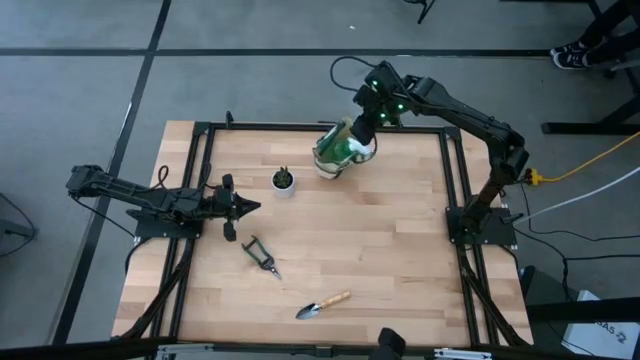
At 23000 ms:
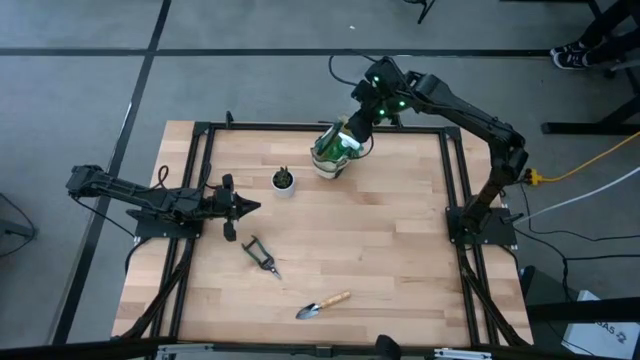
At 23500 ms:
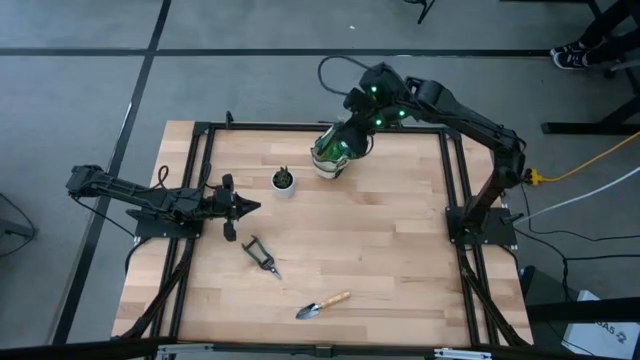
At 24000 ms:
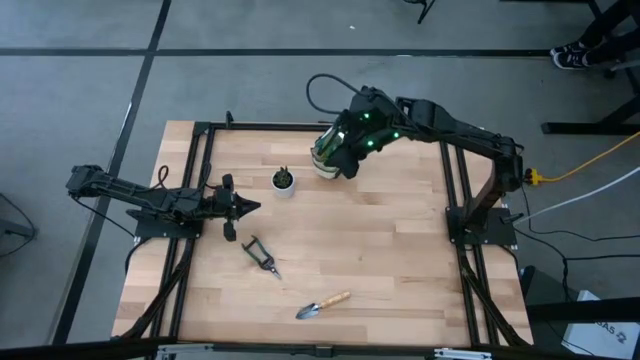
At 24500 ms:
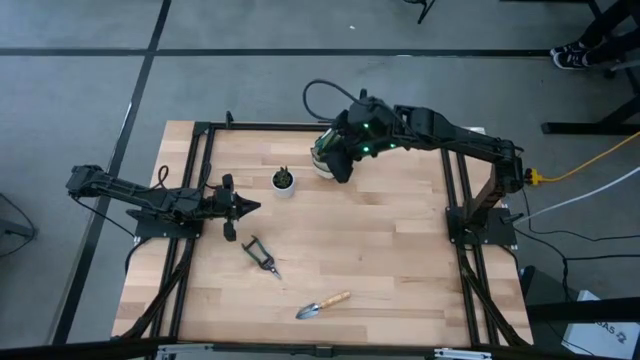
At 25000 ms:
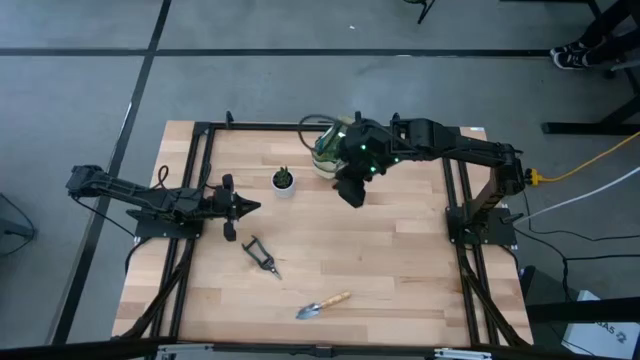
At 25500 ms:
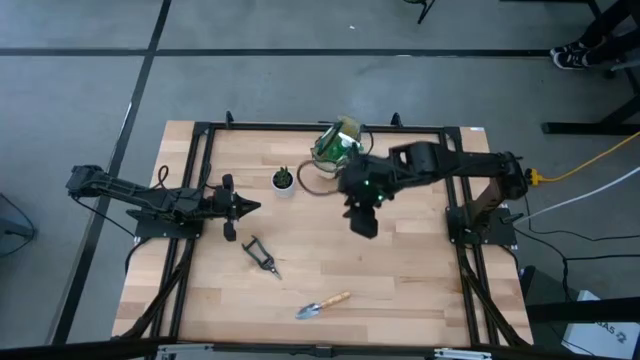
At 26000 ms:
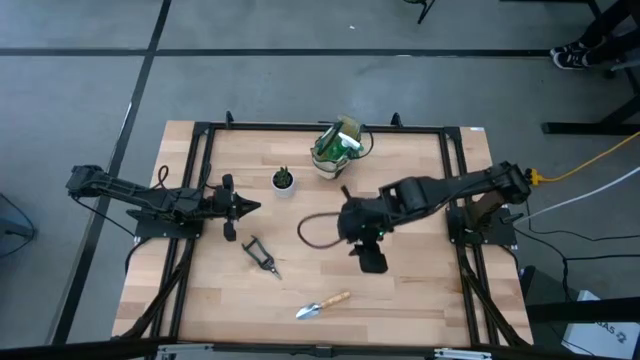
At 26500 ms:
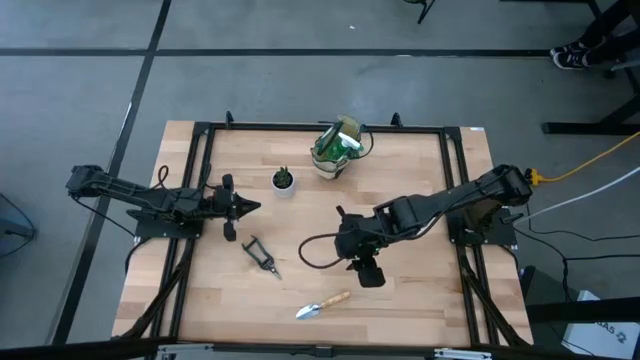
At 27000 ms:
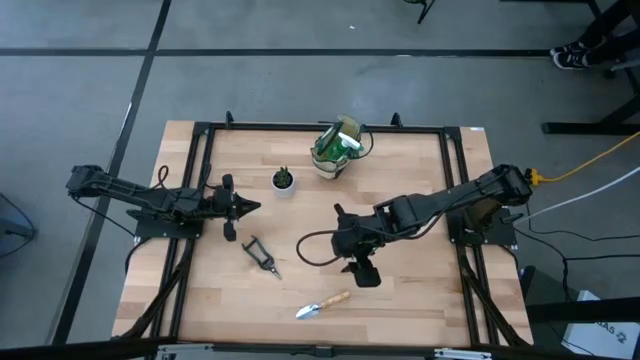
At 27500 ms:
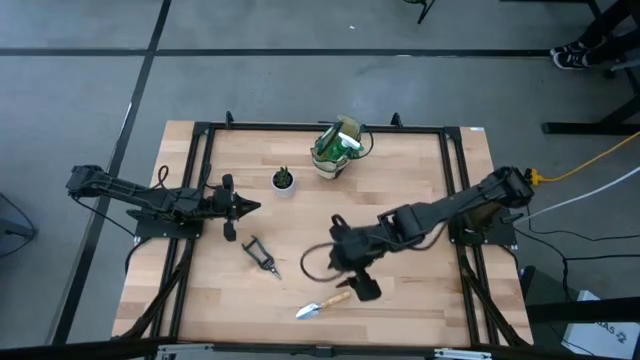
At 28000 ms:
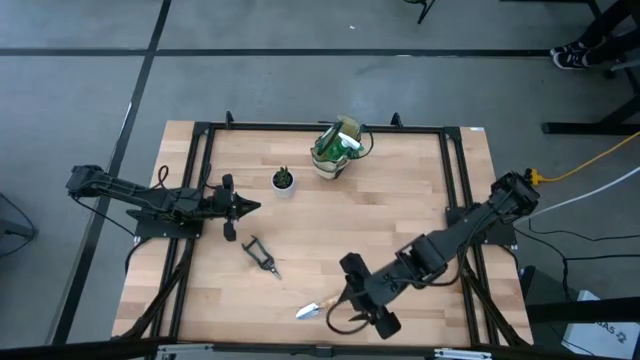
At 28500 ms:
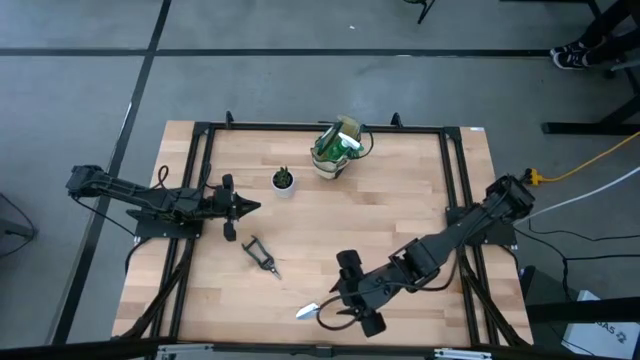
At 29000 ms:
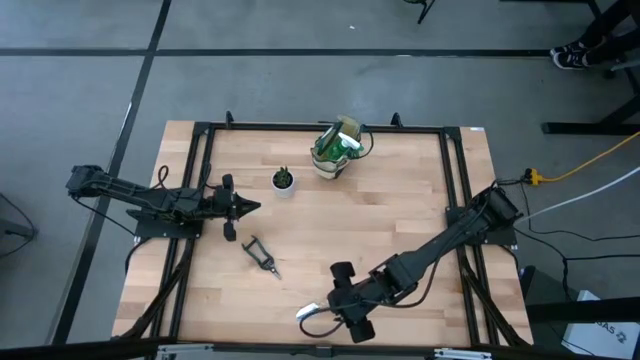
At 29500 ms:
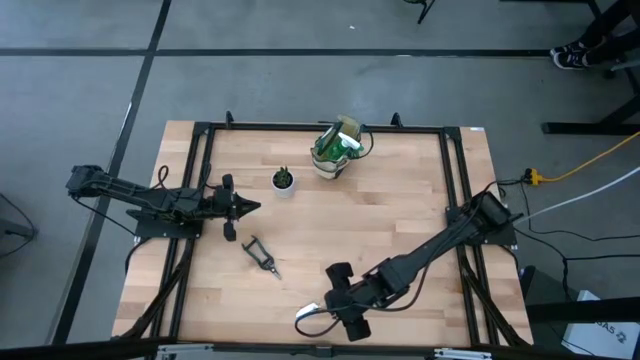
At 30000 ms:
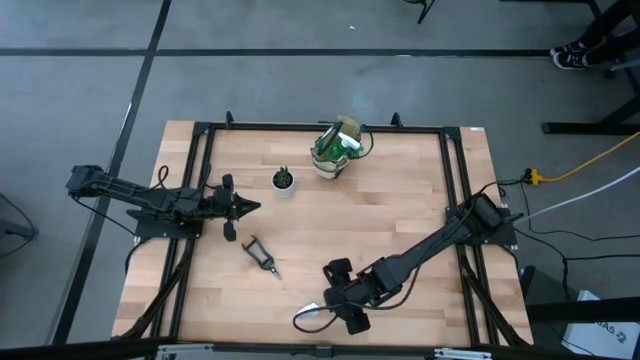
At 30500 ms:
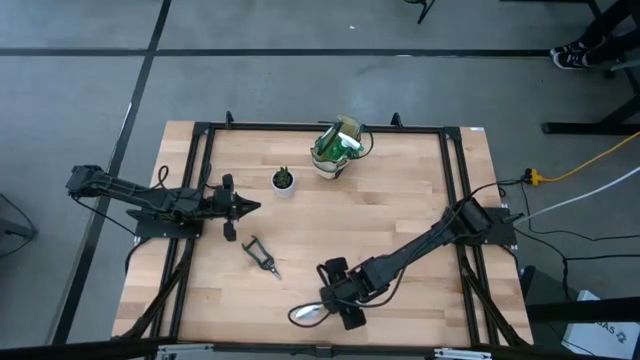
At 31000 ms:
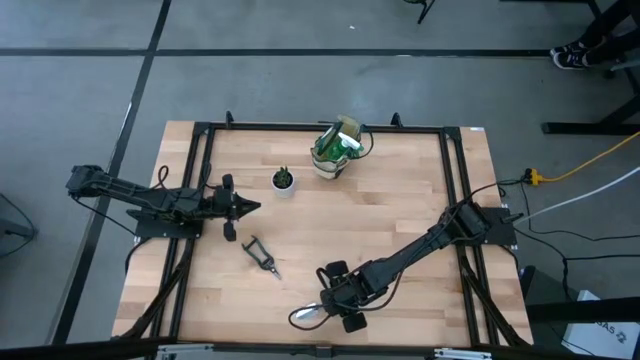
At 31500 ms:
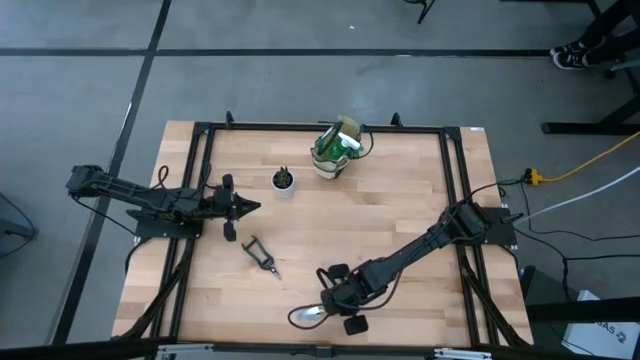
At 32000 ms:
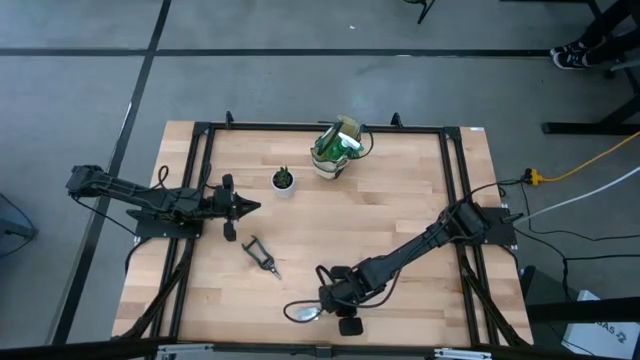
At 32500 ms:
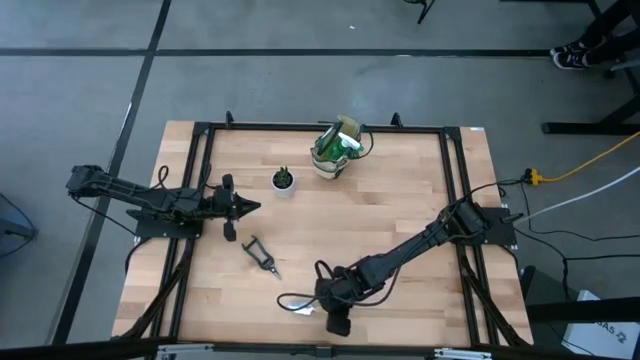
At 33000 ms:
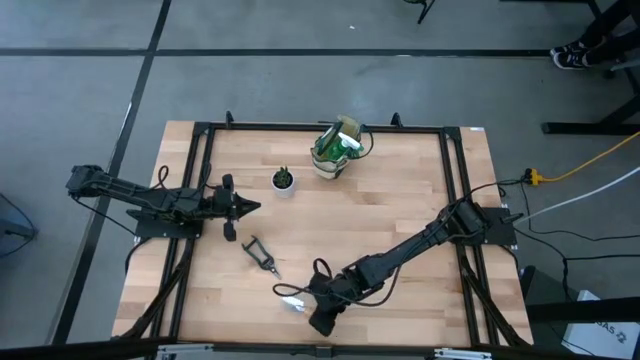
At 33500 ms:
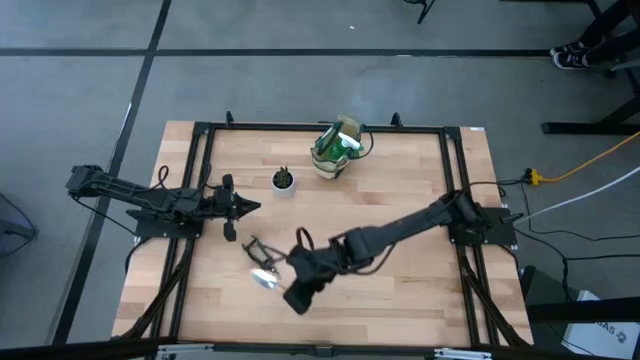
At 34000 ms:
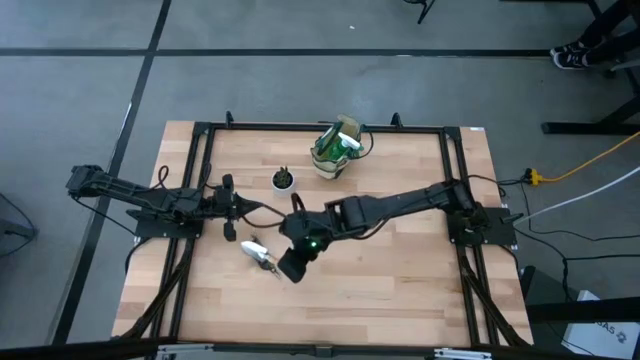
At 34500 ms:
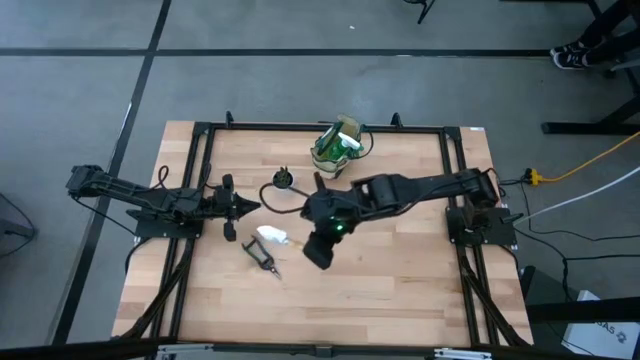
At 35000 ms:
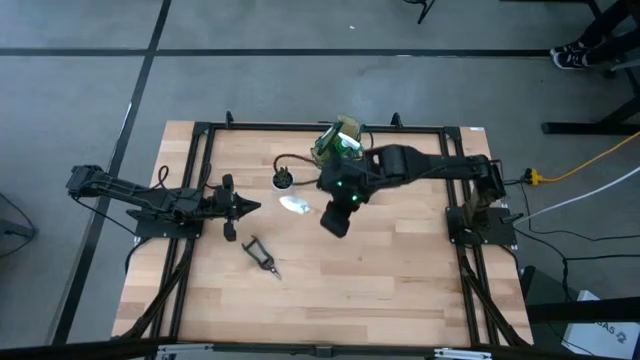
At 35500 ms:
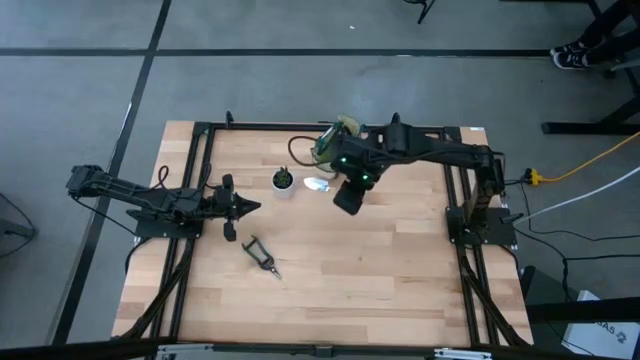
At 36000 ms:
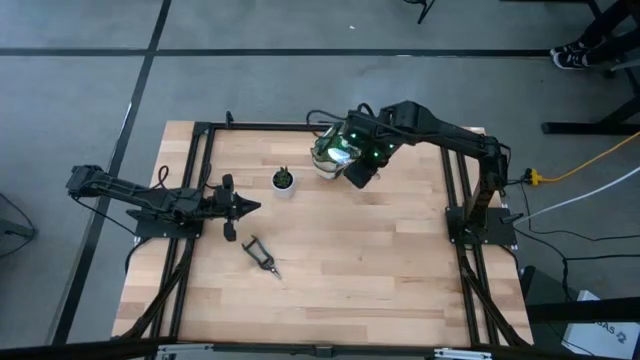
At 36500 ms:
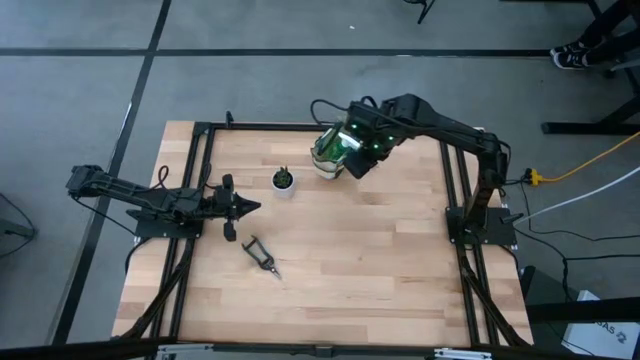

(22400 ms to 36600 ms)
Task: Pick & Place Garden tools in Gardening bag
Put the trowel into the gardening bag

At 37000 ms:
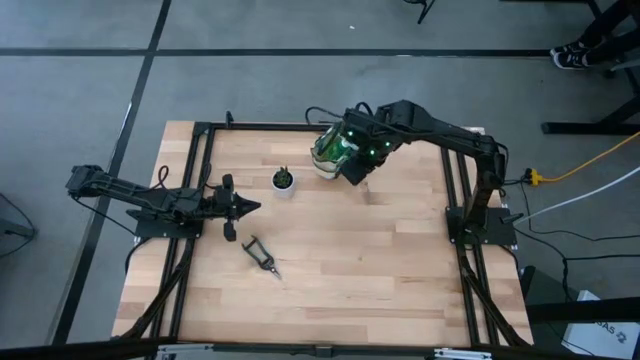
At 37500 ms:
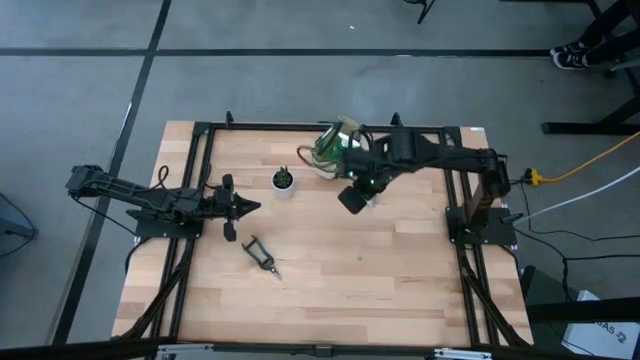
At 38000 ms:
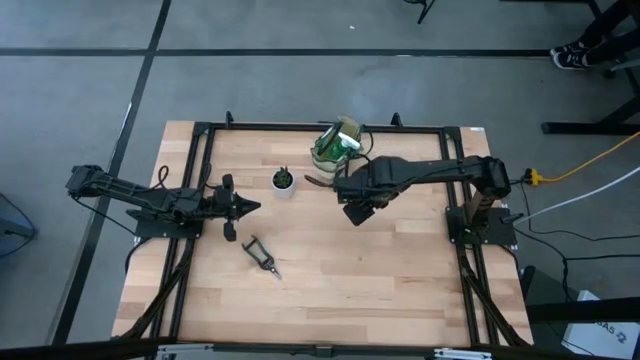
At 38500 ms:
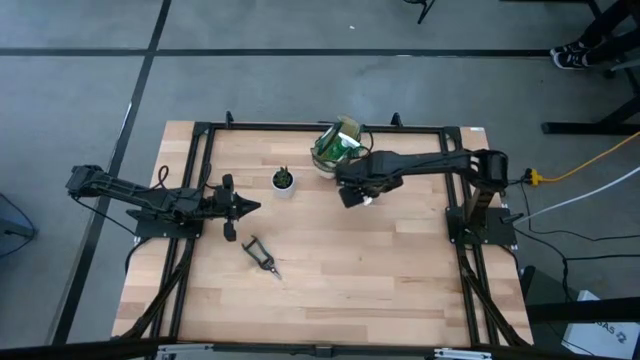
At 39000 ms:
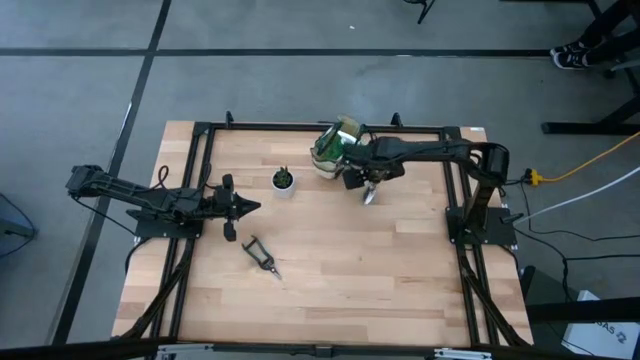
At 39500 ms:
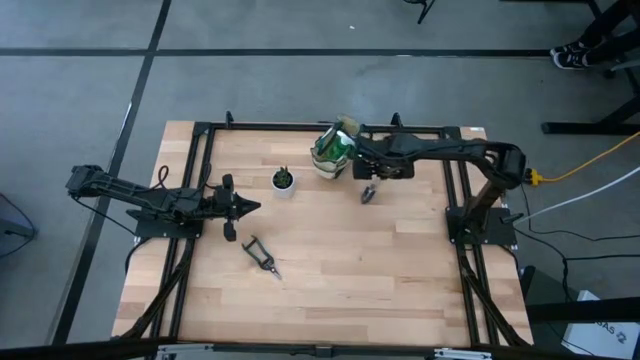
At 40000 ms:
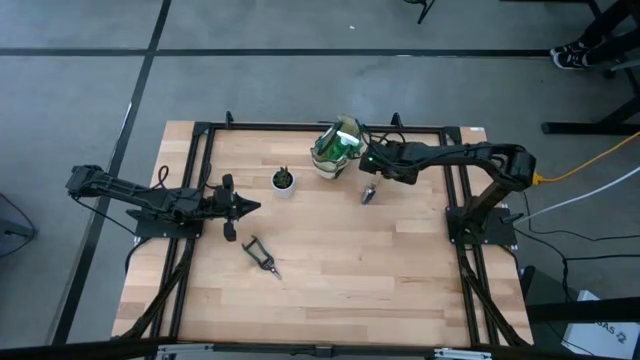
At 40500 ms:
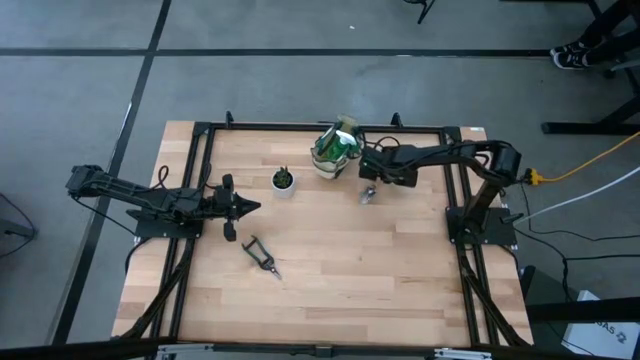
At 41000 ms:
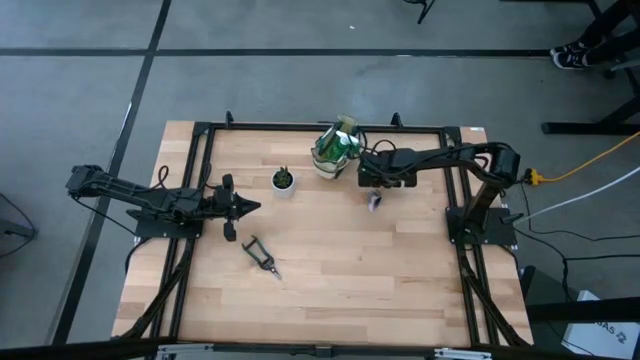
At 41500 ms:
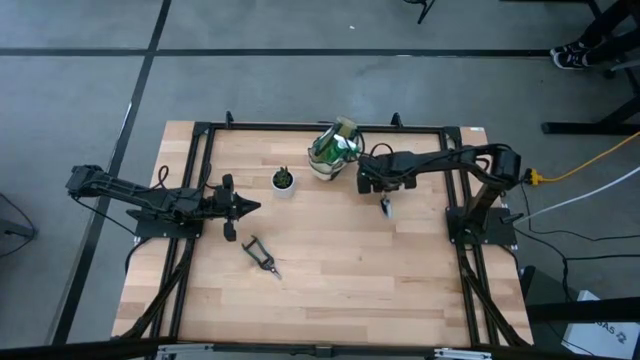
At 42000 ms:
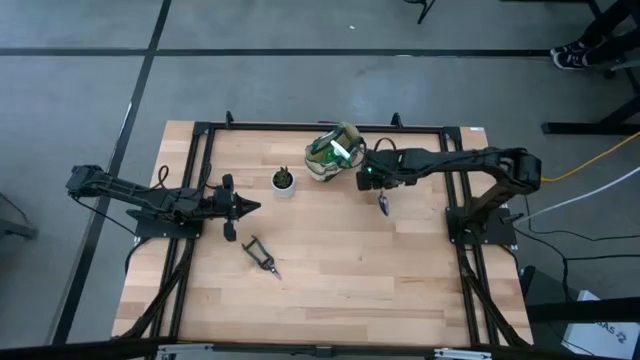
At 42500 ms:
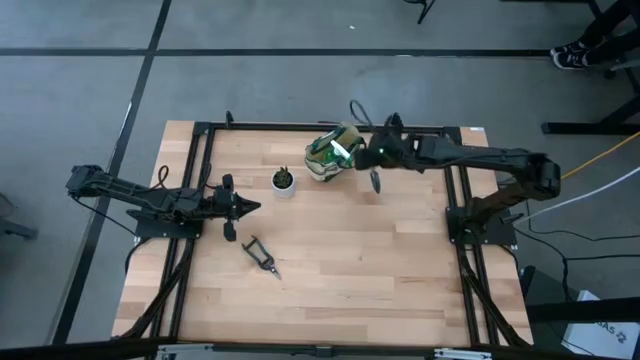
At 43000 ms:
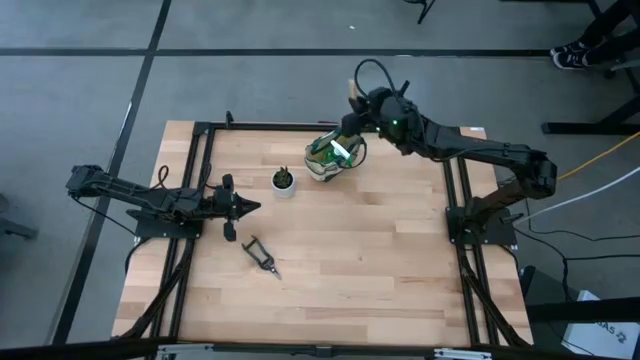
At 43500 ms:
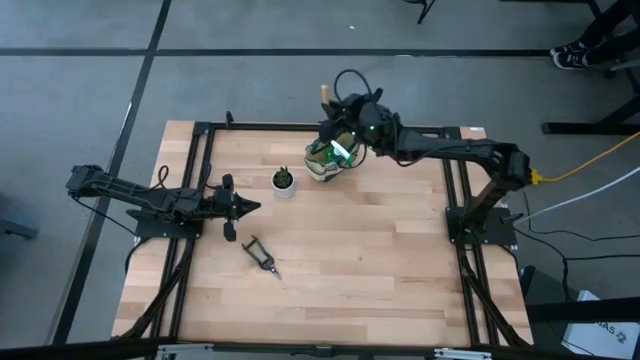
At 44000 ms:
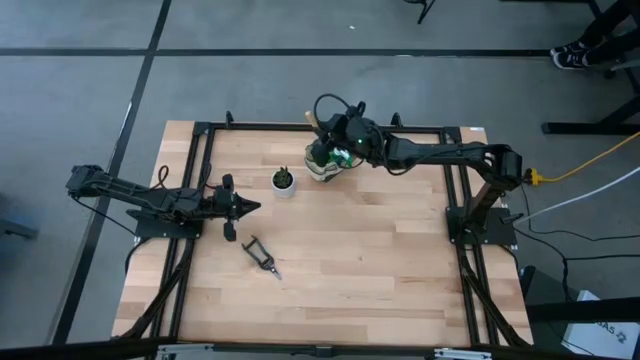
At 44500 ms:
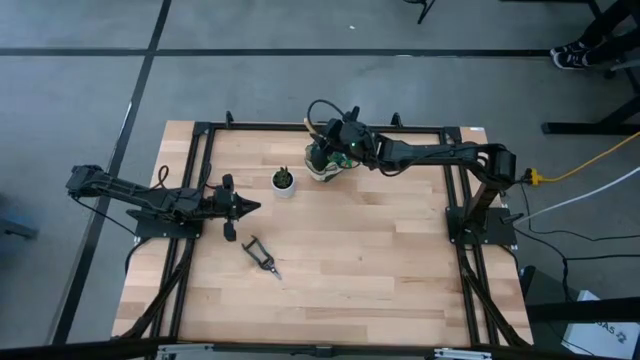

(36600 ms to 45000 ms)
Put the trowel into the gardening bag
